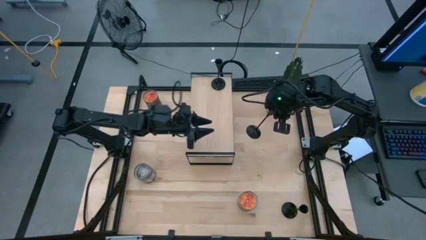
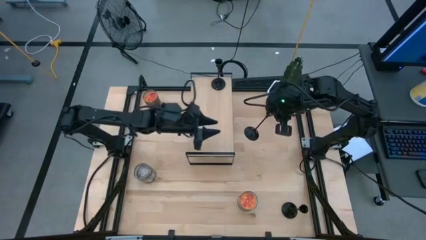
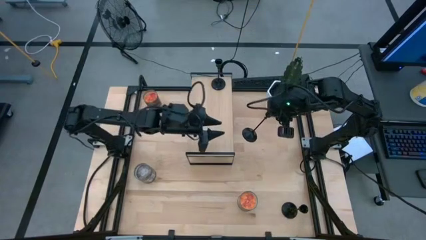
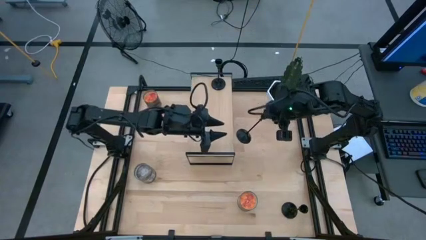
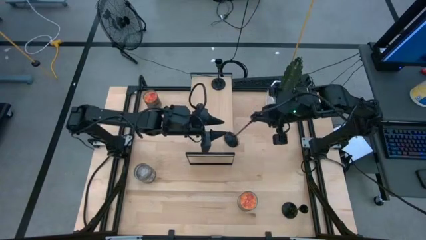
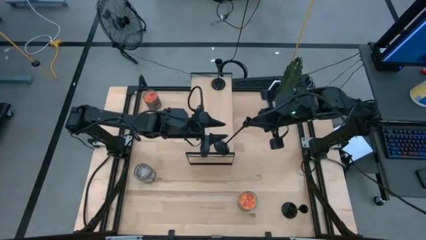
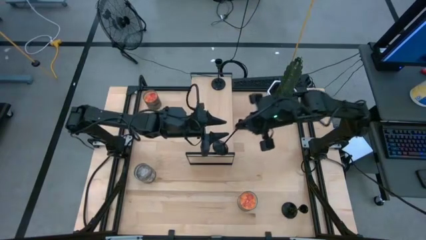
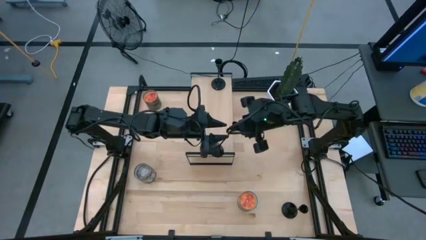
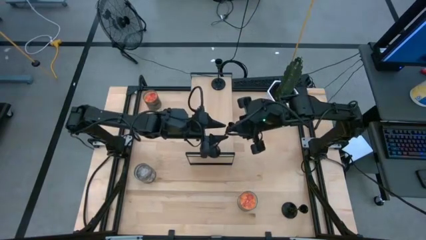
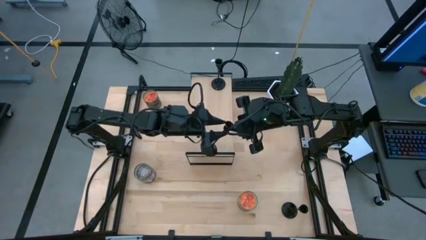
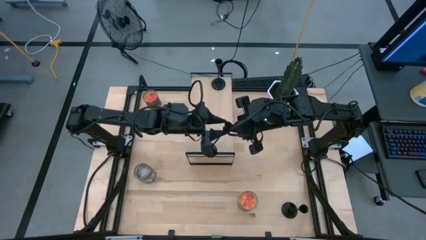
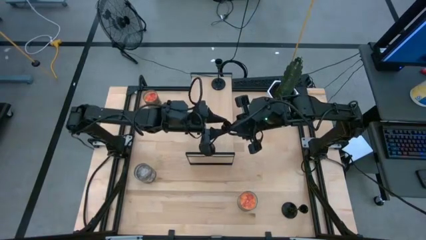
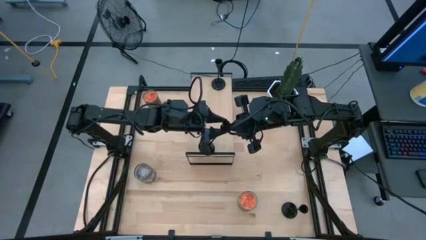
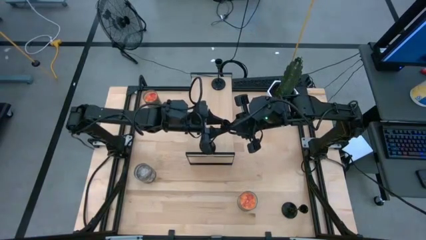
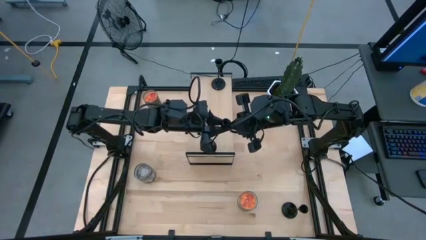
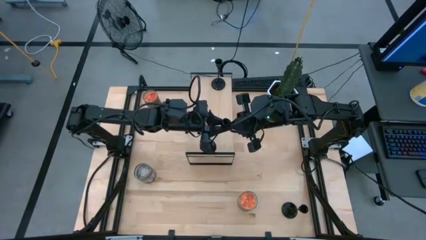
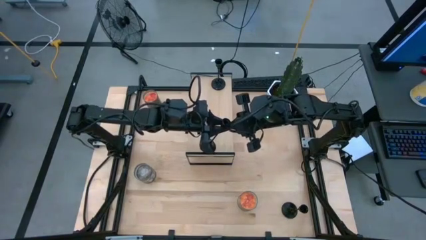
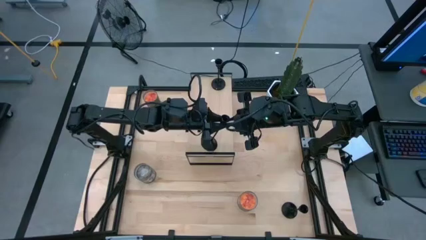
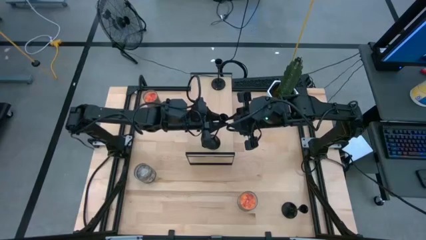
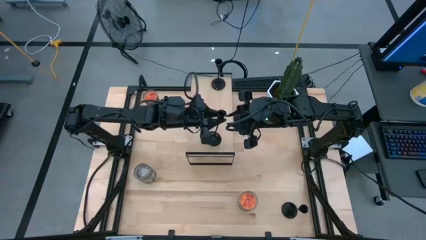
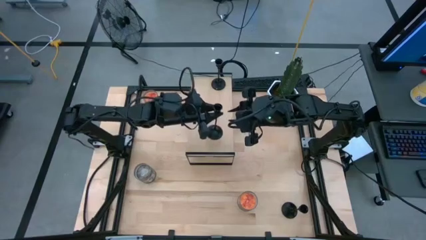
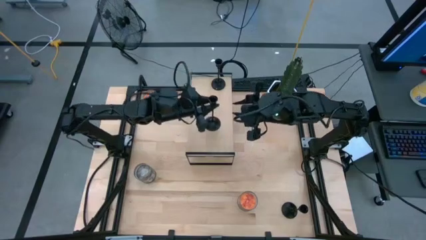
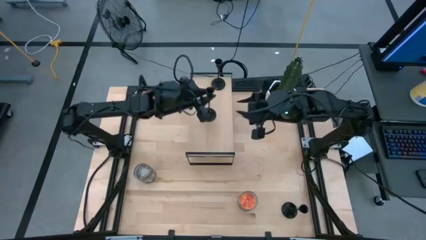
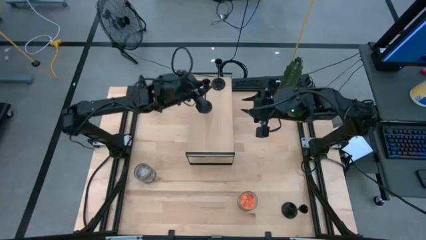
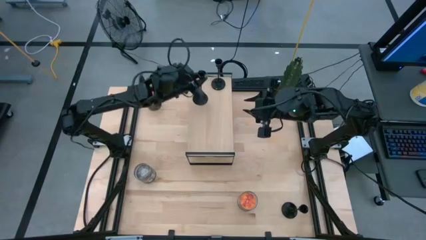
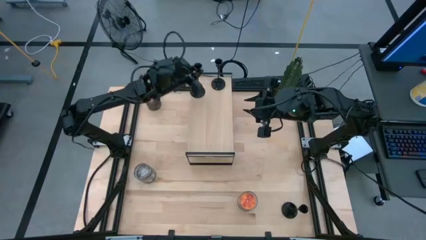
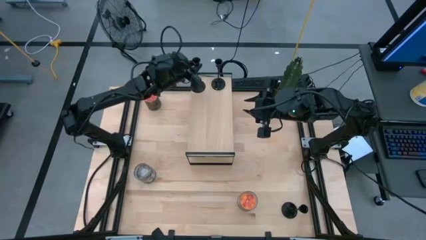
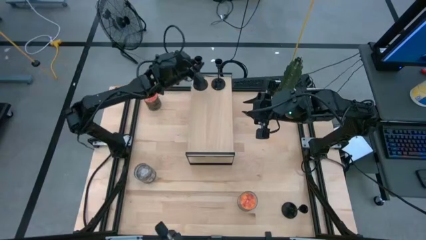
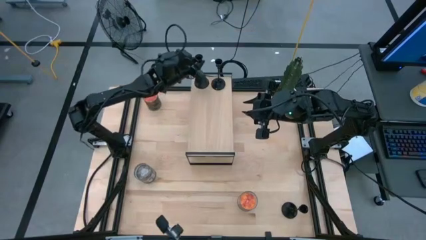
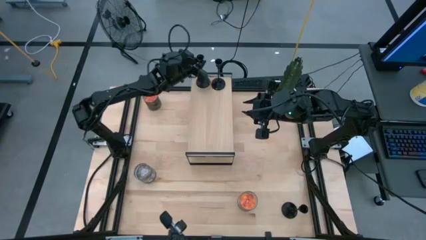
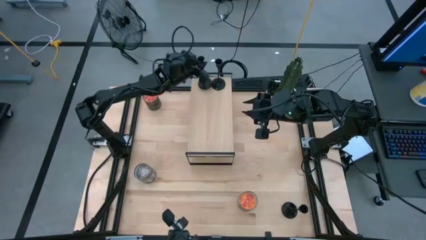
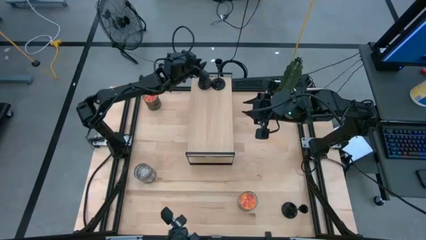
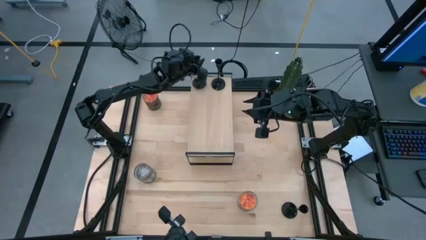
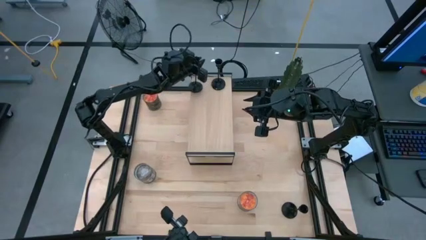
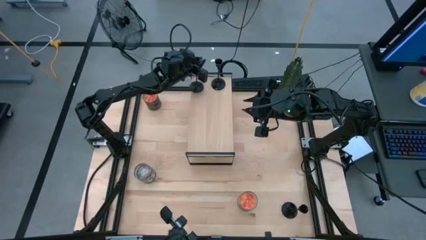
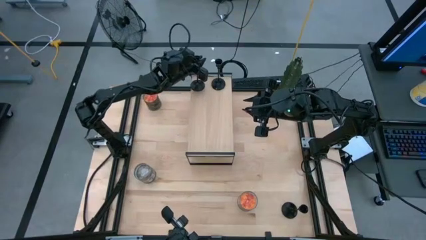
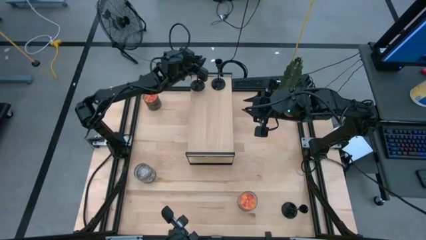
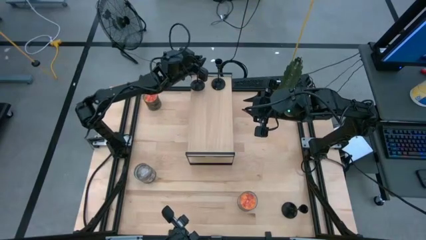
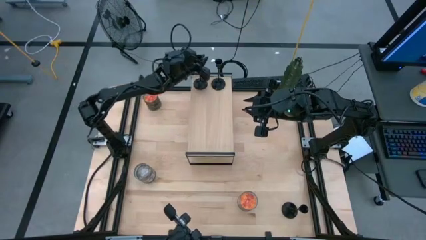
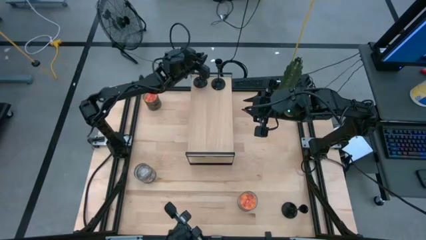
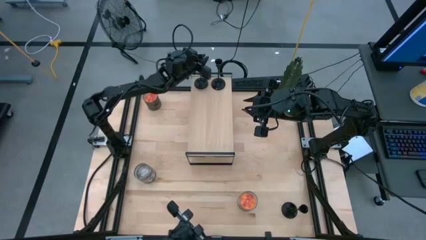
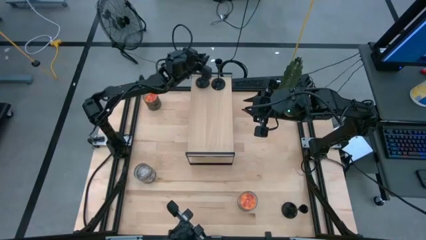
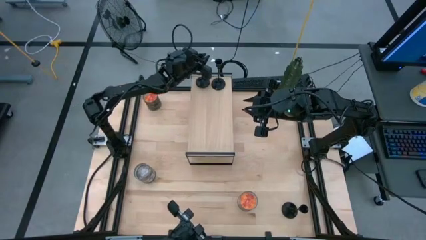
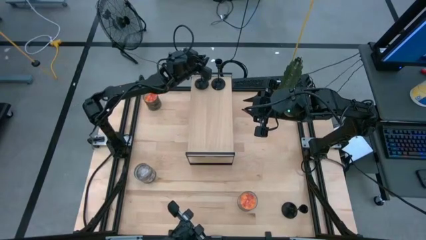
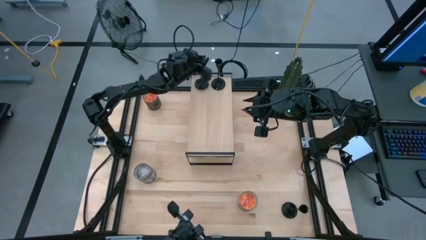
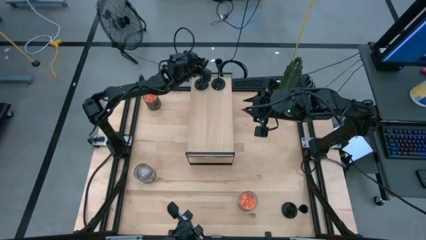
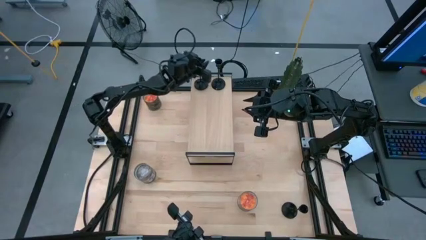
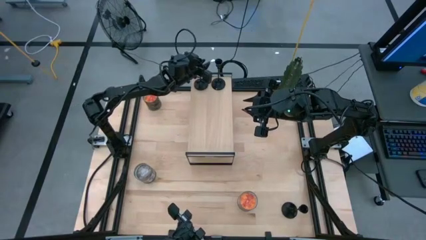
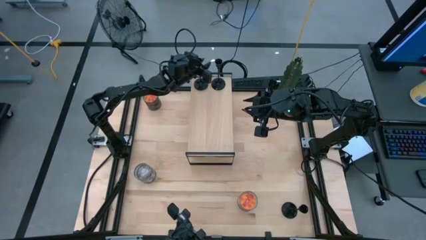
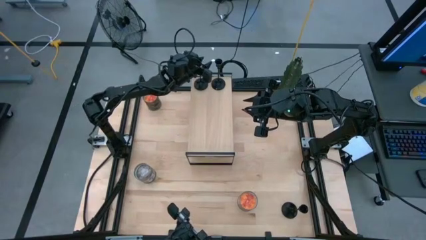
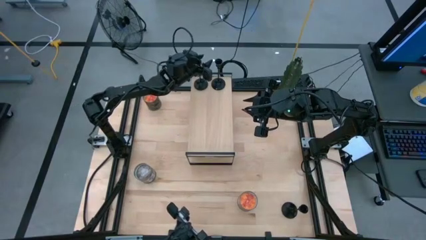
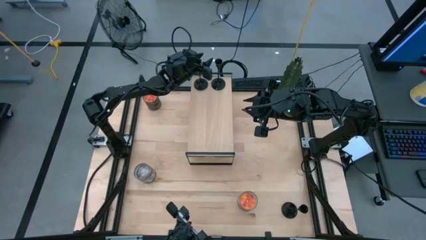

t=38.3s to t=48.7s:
Task: Pick & Place candle stick holders
Put the top black candle holder on the shelf

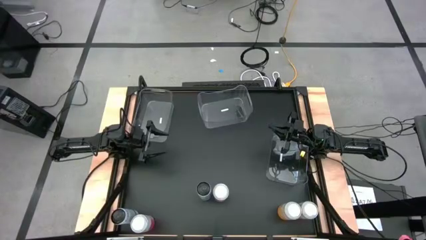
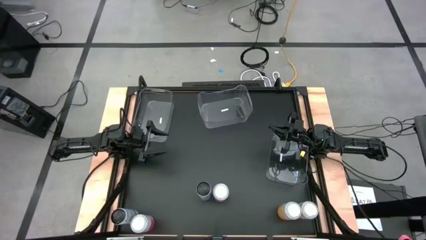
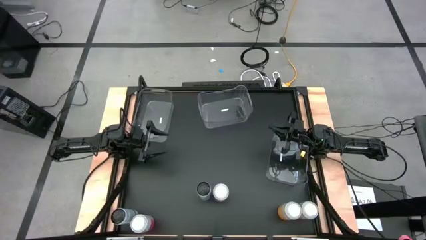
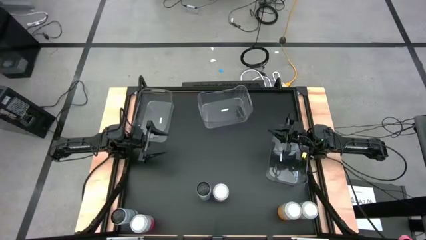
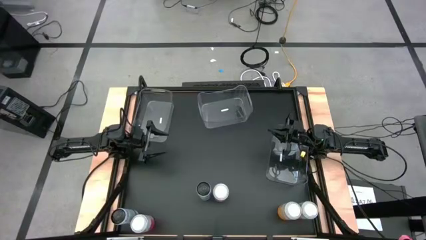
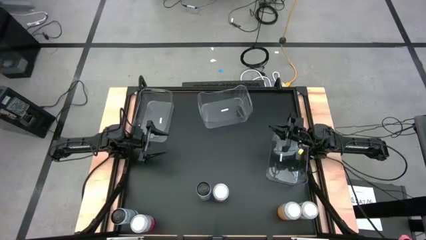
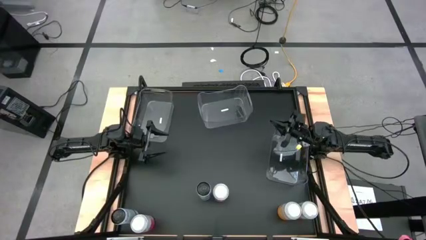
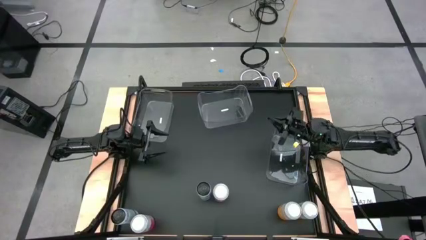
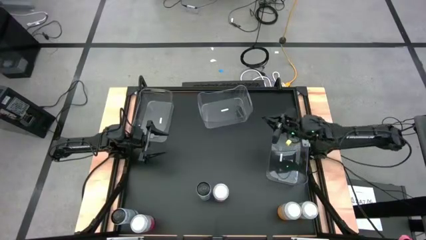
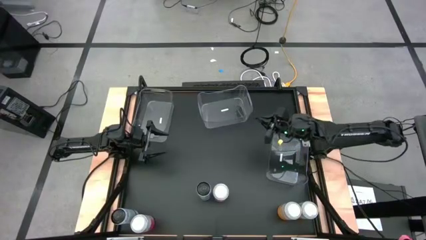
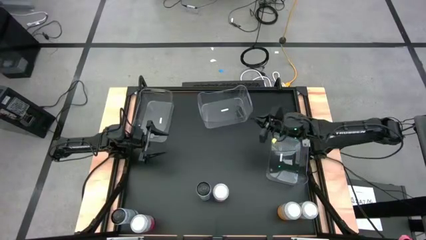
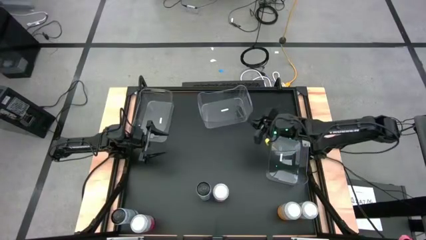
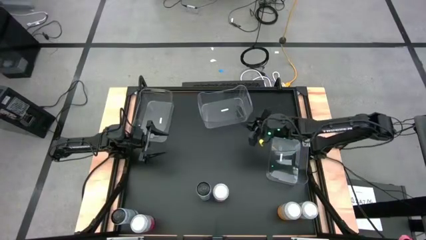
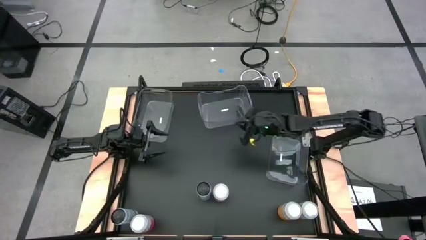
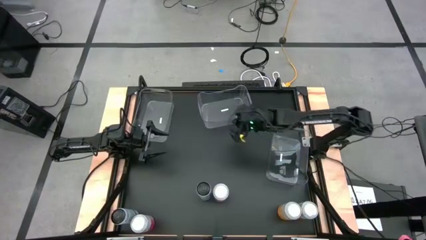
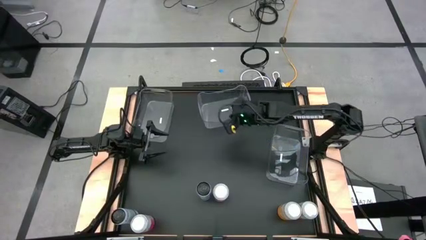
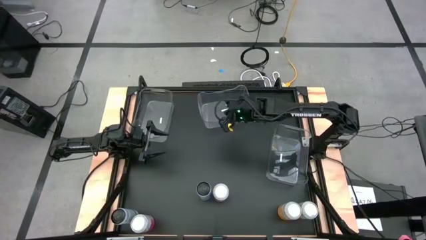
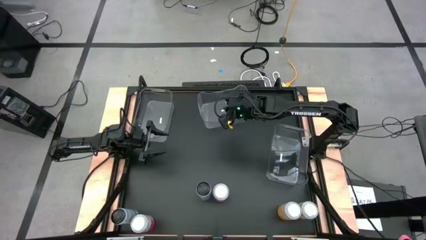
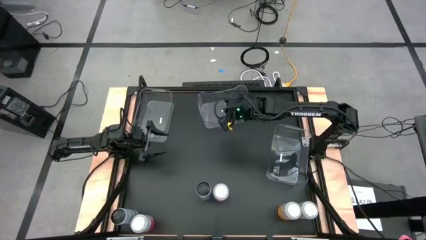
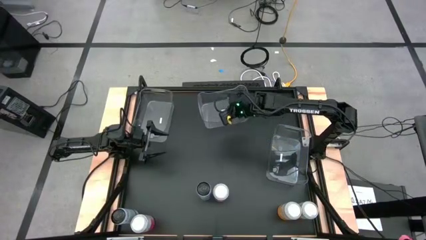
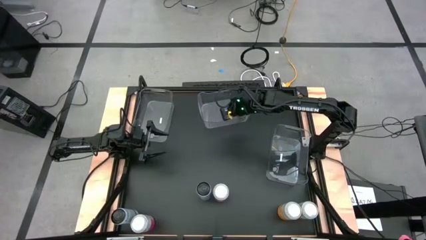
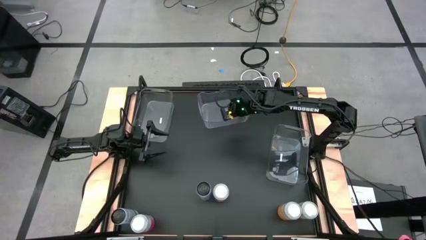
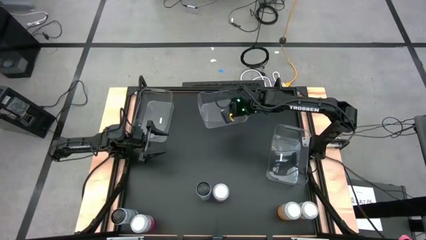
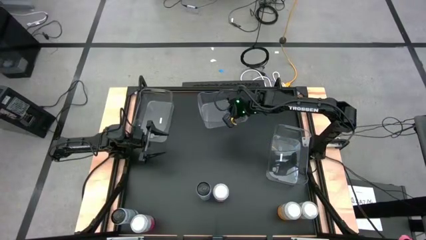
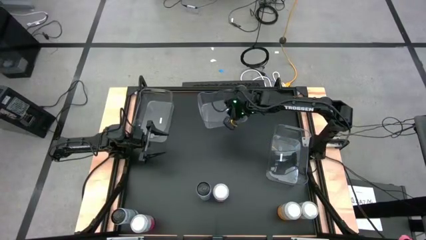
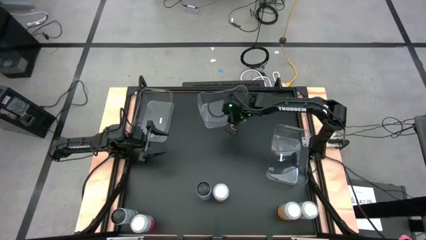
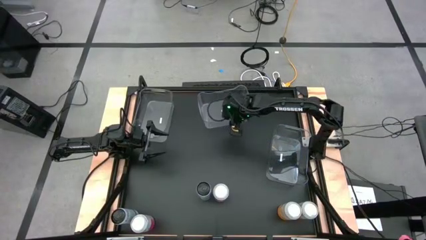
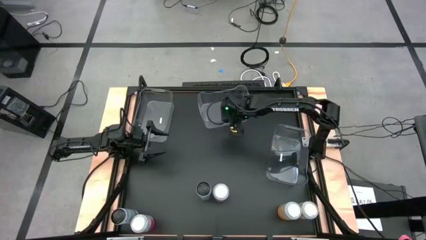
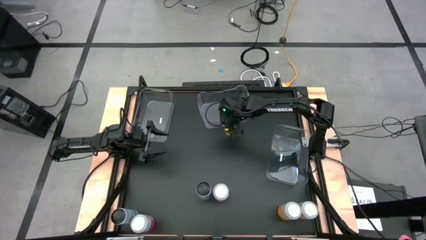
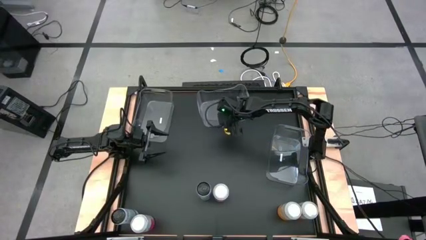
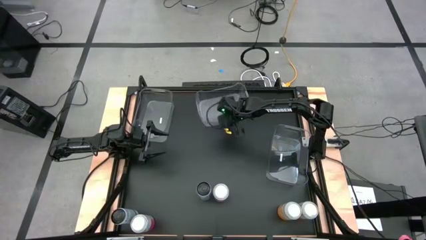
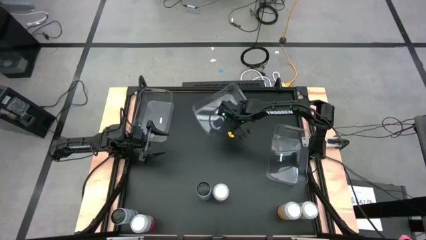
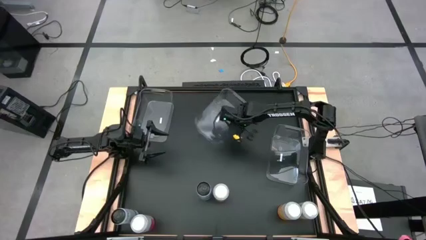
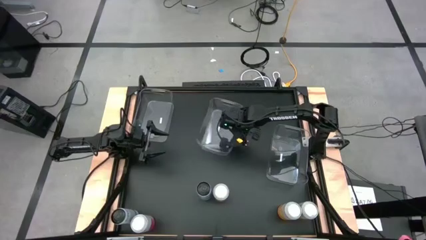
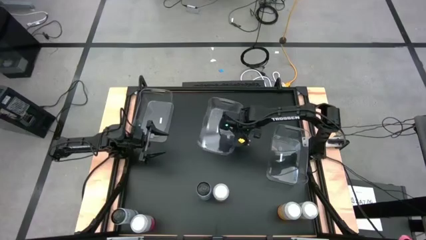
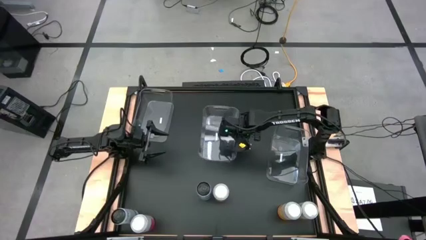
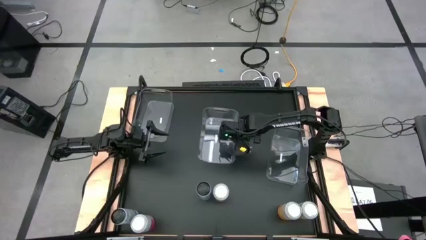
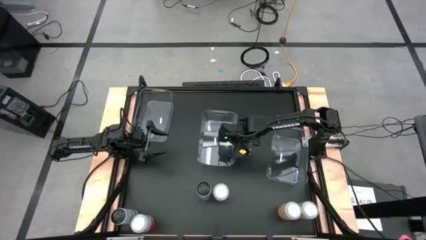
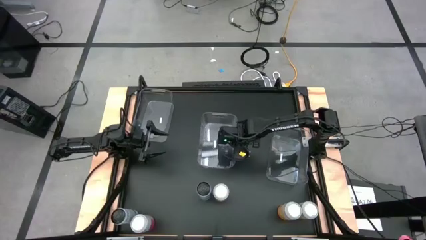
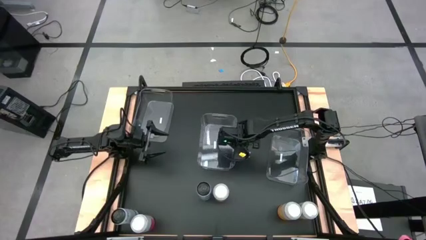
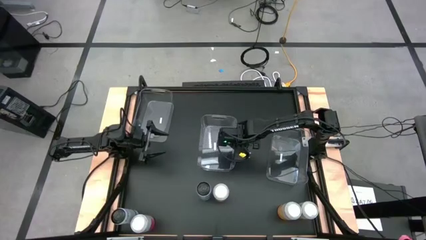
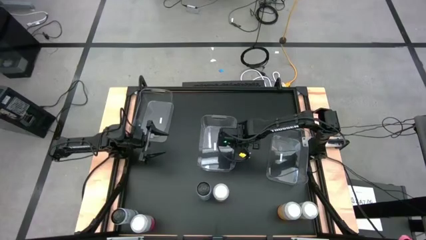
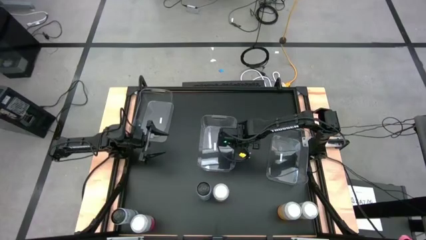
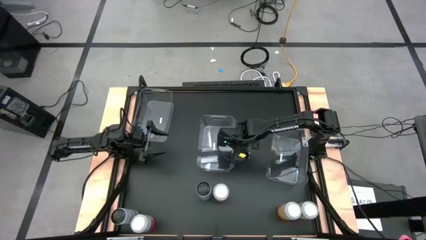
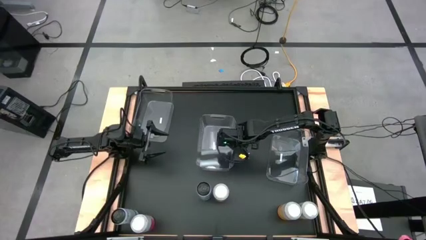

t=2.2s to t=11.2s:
Task: Sort soda cans
Move the middle transparent bin to the center of the table
